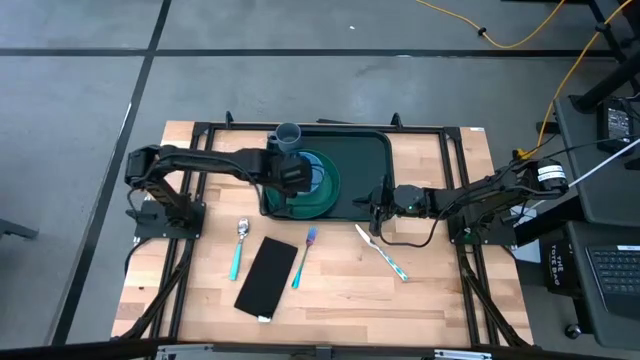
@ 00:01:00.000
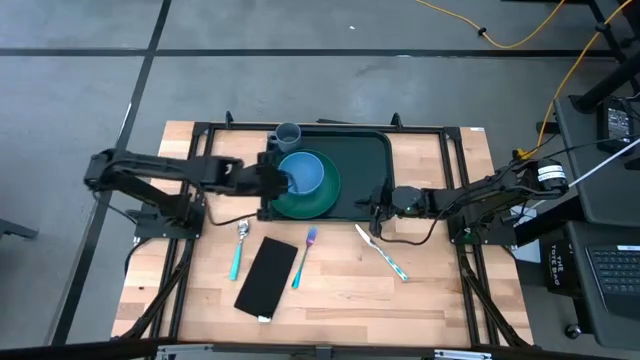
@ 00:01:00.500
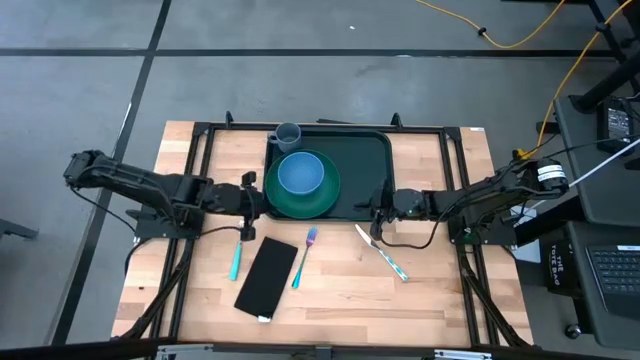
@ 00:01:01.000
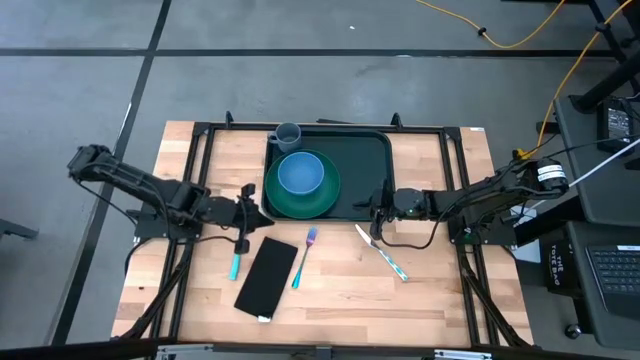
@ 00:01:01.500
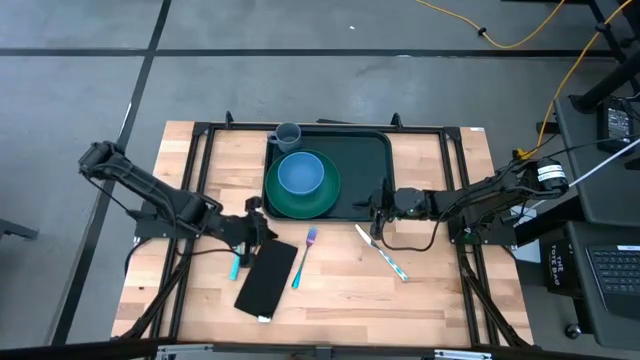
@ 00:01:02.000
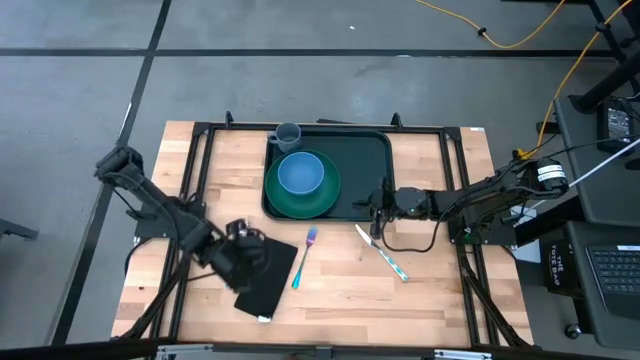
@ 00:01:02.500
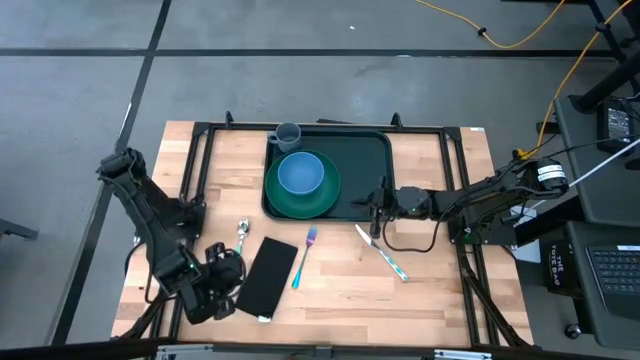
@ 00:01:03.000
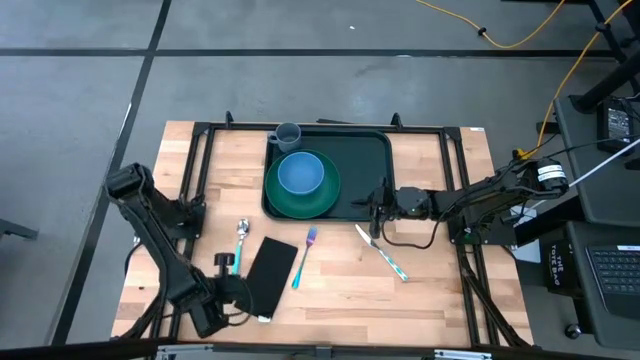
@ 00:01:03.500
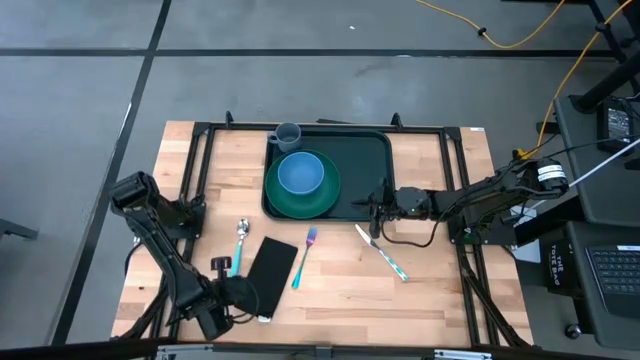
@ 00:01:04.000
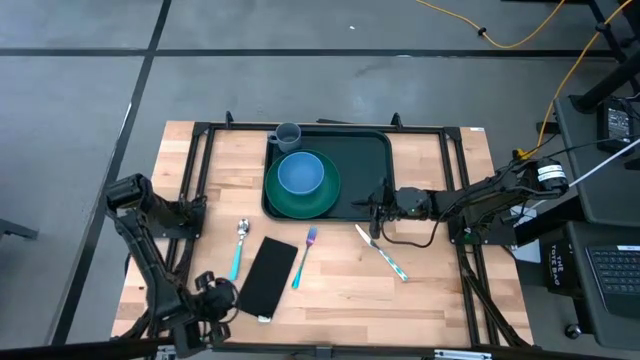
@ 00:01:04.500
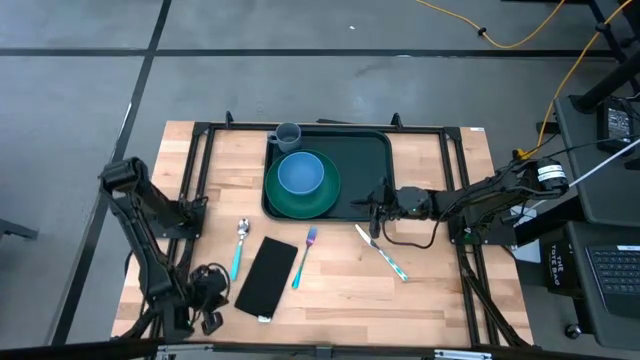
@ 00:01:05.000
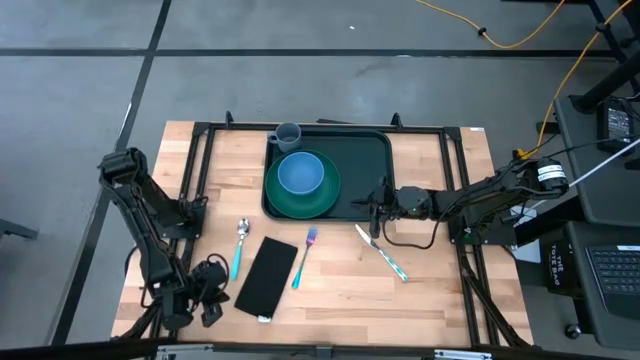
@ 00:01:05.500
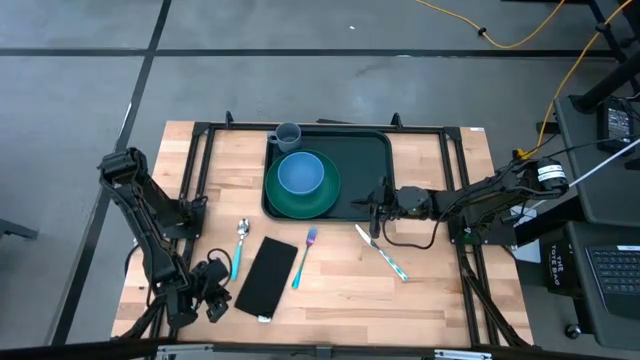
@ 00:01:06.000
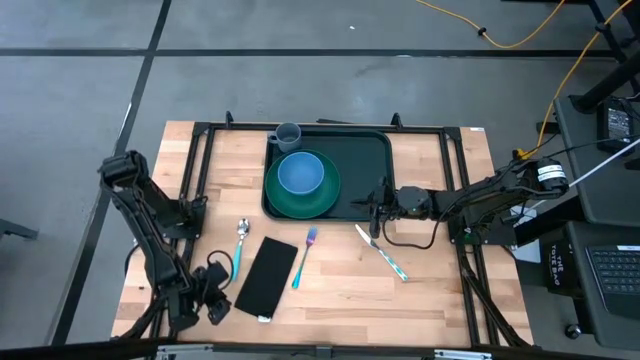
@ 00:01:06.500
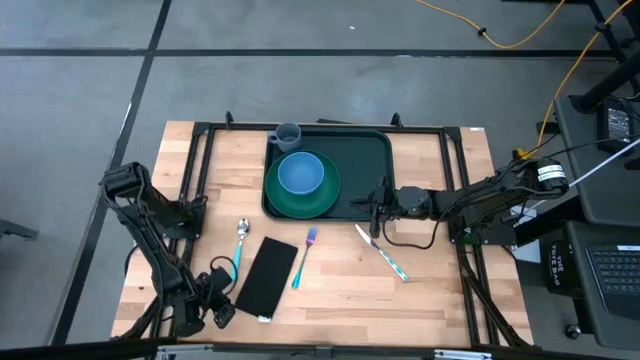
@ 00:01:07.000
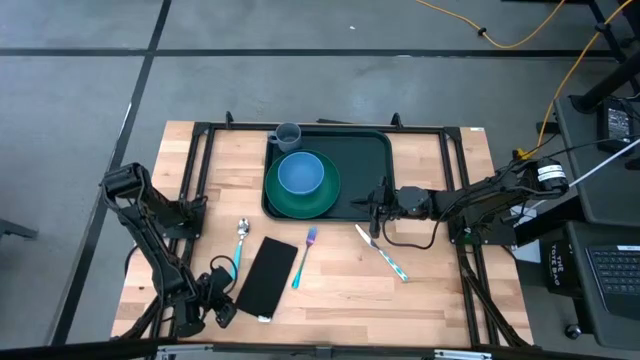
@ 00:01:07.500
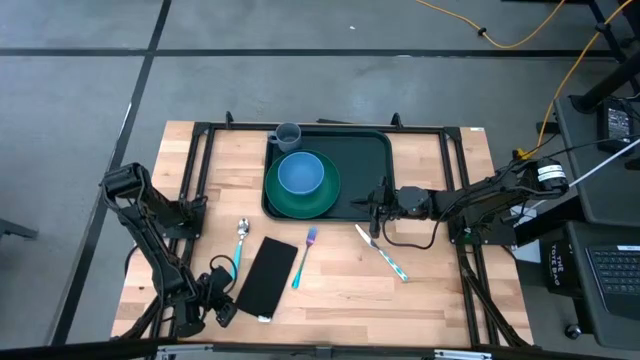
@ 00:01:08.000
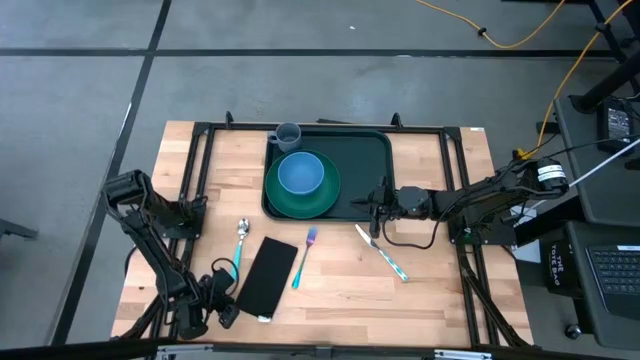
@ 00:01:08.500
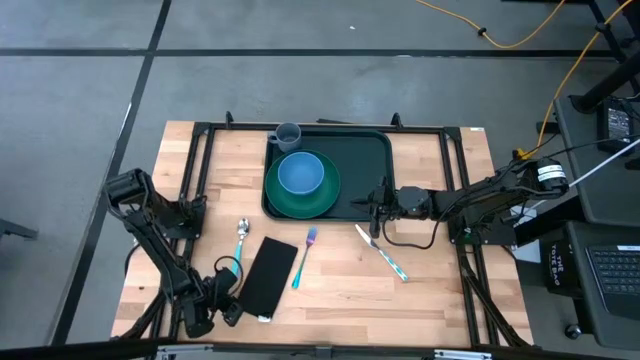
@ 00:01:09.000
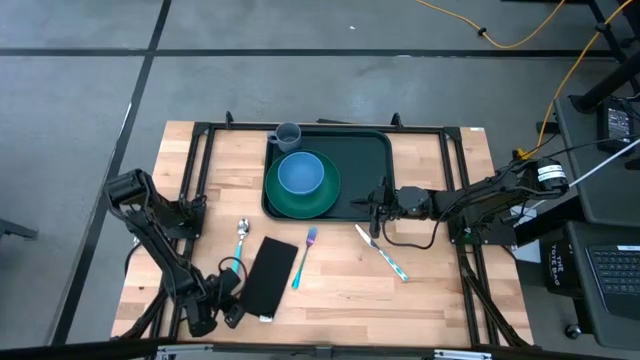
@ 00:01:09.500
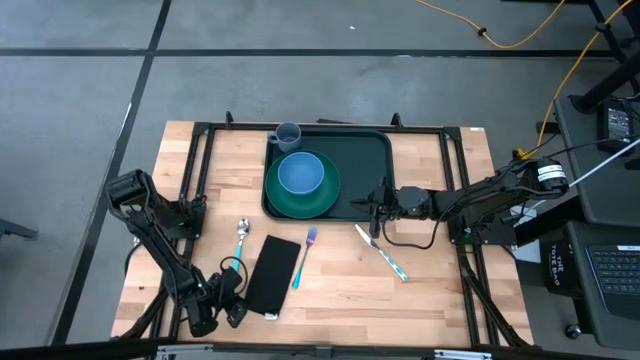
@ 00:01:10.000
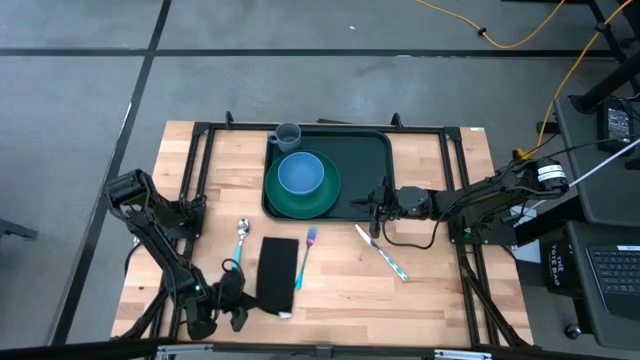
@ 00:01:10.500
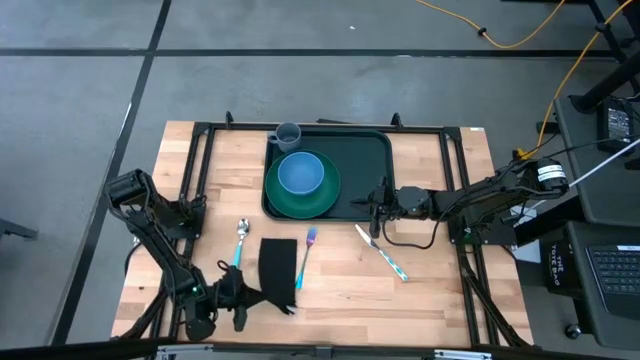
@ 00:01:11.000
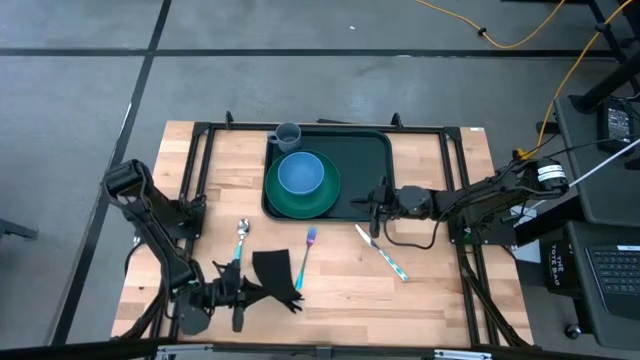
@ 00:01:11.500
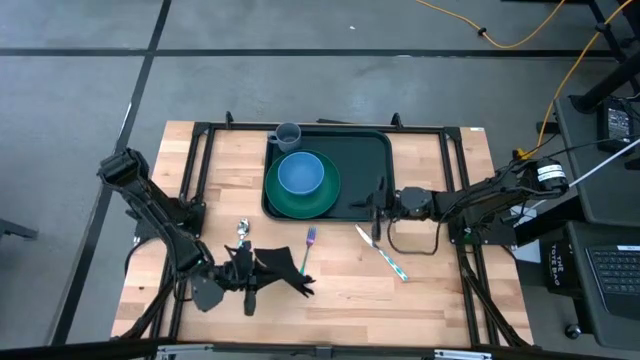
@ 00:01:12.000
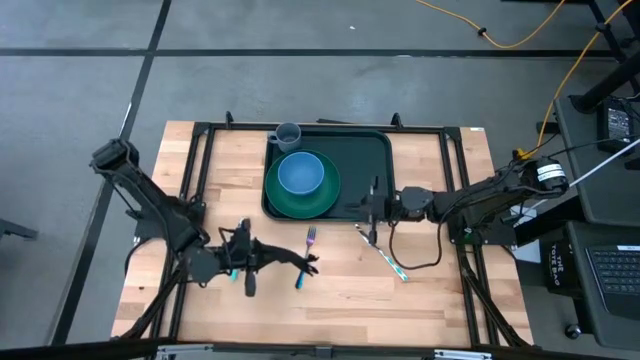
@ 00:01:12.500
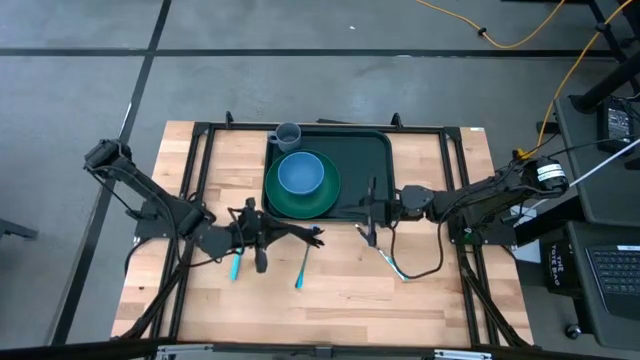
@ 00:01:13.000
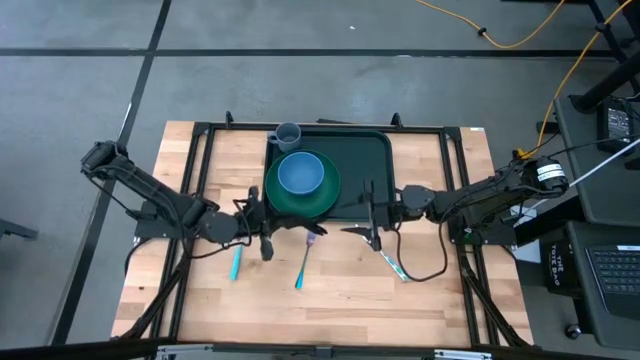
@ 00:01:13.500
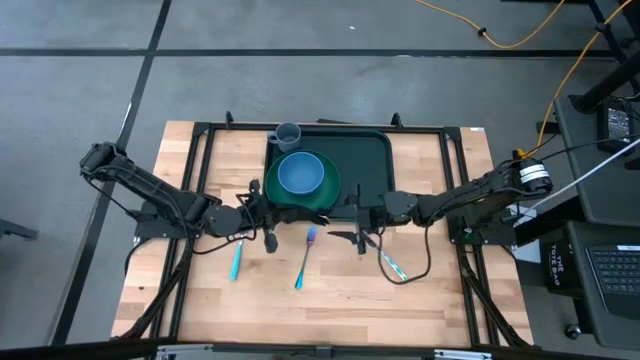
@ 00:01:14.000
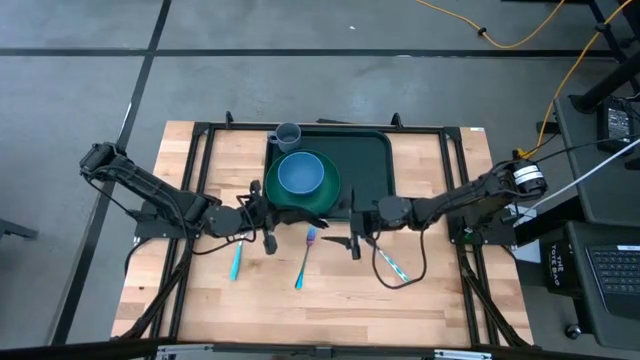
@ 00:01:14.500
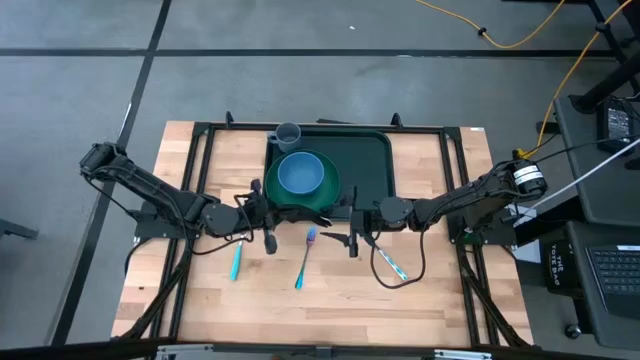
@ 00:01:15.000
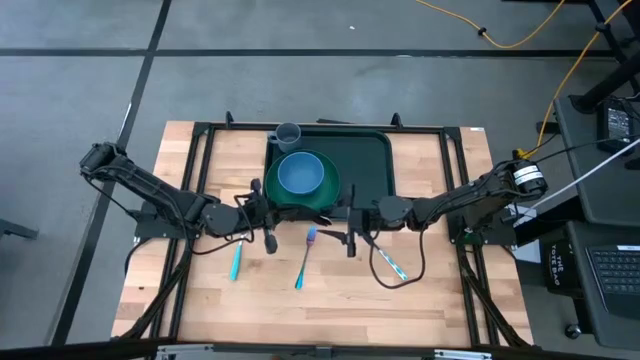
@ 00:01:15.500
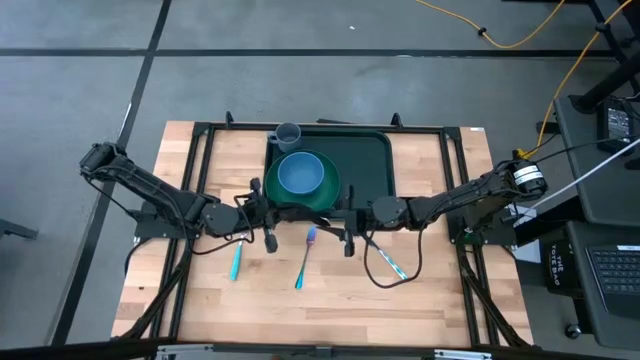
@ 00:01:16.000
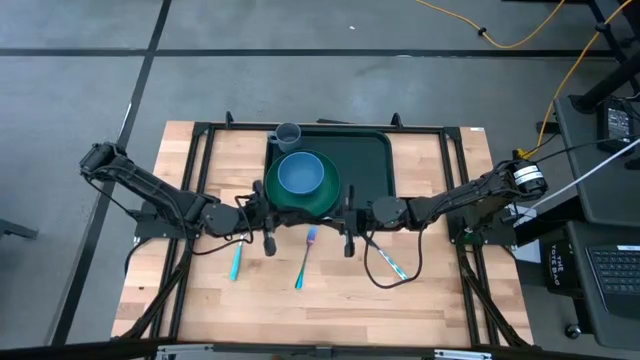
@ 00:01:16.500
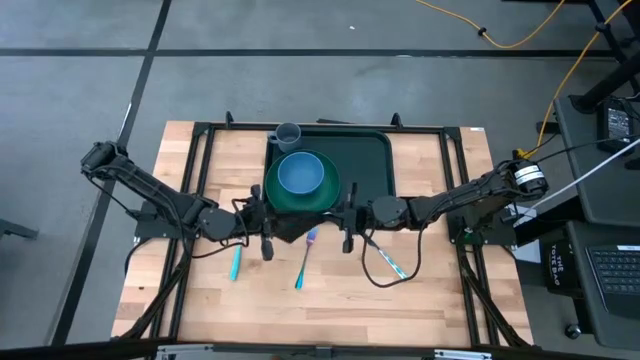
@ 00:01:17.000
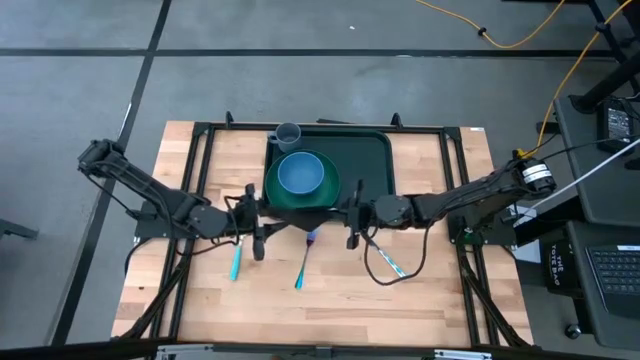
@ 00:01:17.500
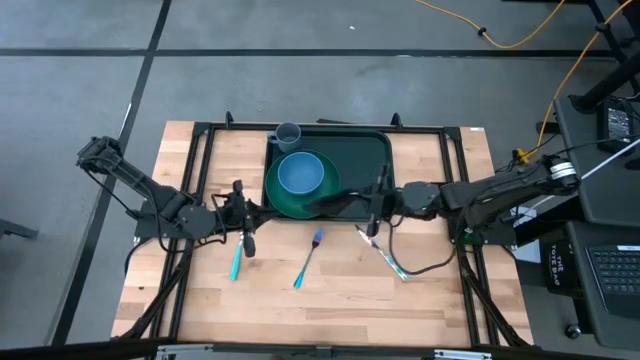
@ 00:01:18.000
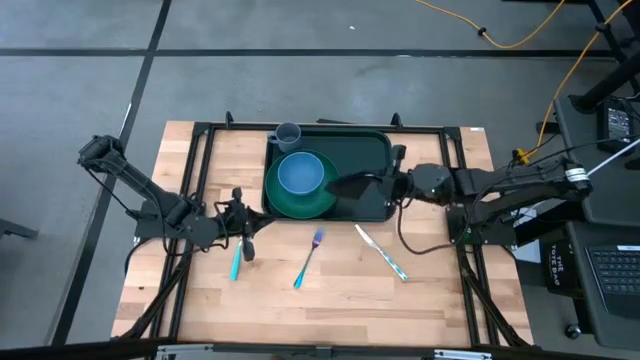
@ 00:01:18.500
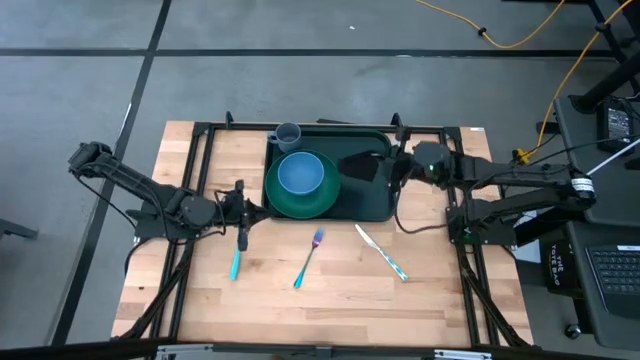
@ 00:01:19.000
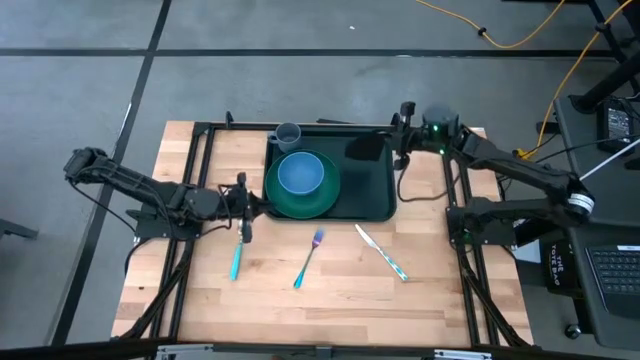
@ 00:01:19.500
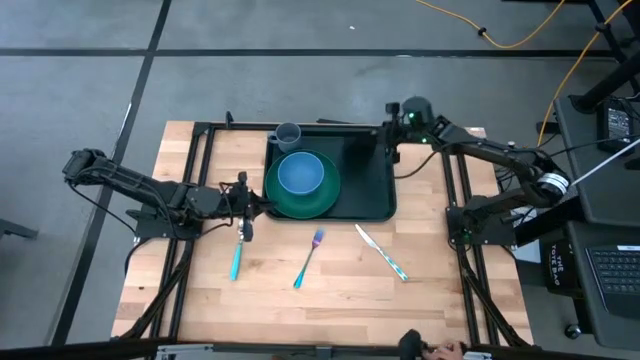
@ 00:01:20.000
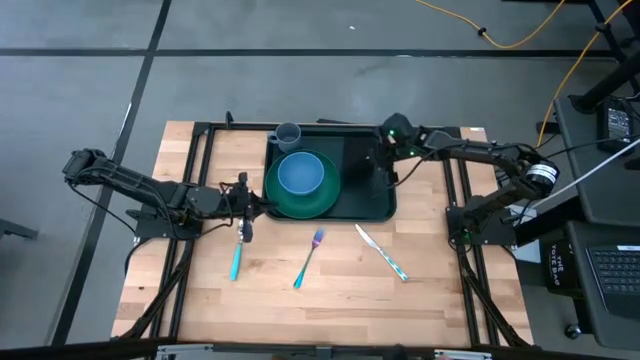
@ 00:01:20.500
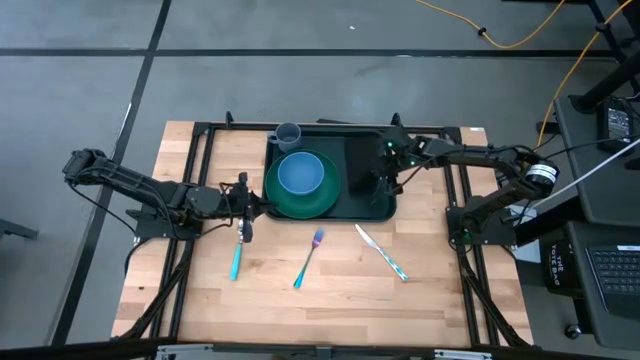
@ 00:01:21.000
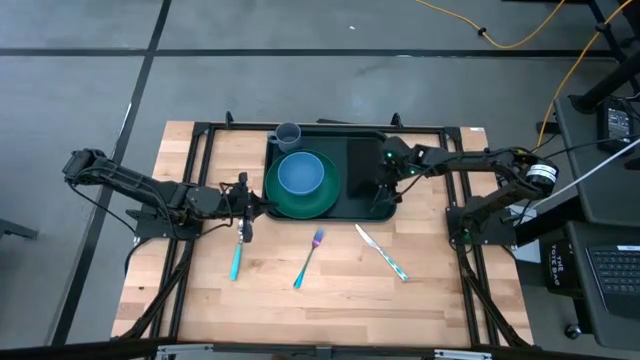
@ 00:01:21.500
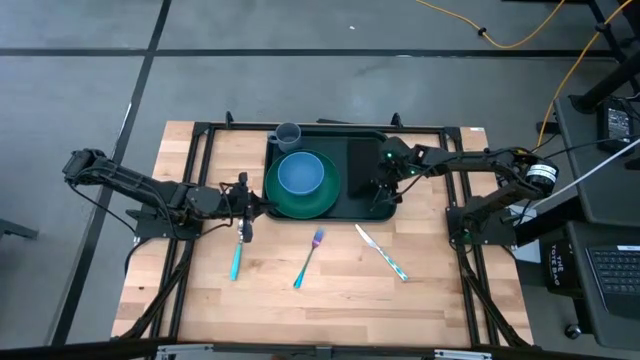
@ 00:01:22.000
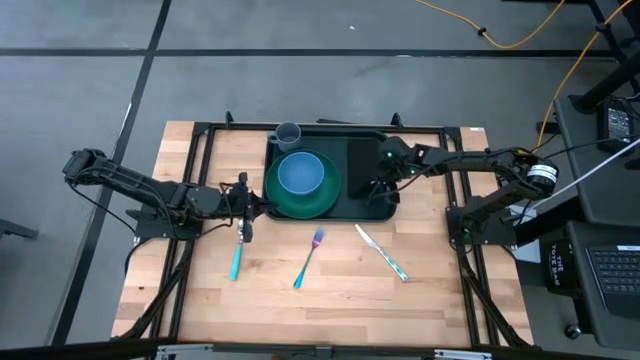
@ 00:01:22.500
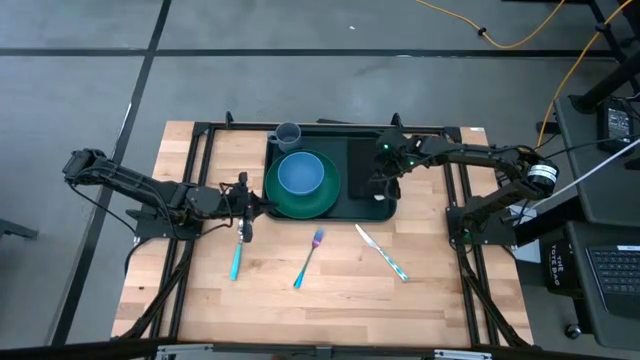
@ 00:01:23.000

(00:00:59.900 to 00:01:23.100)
Task: Set up tray
Put the black table napkin on the black serving tray to the top right of the green plate
